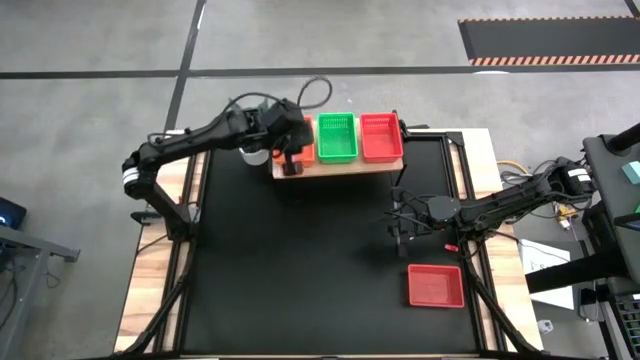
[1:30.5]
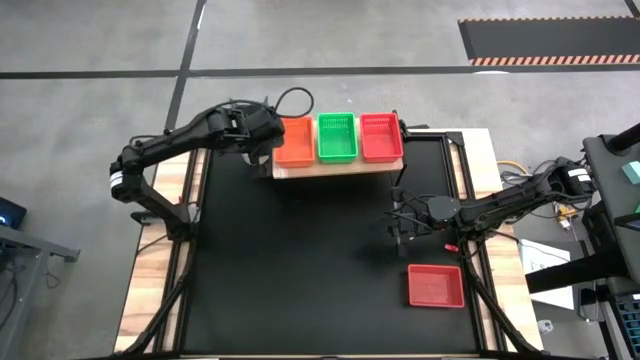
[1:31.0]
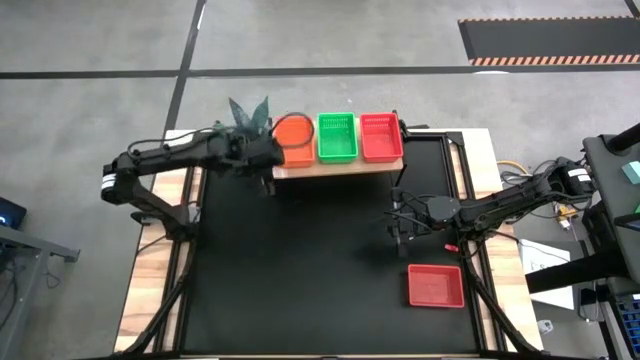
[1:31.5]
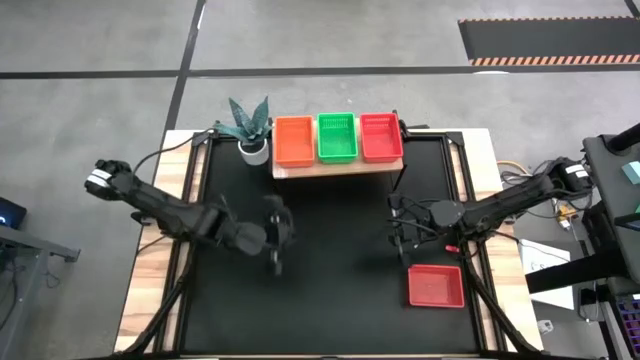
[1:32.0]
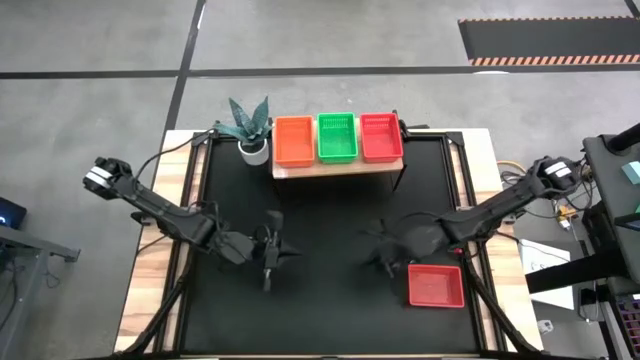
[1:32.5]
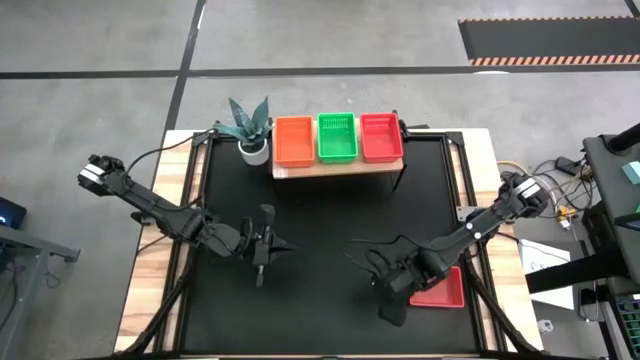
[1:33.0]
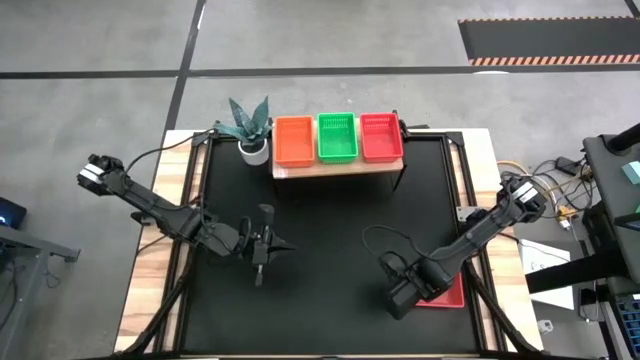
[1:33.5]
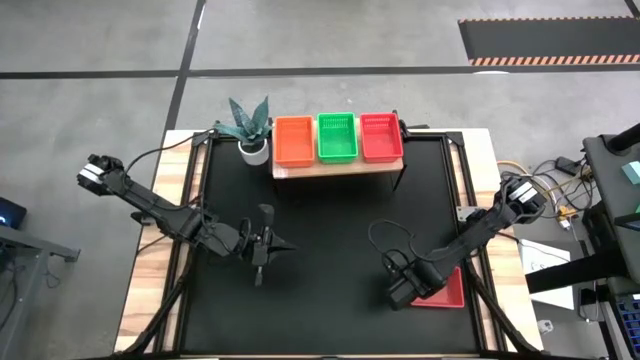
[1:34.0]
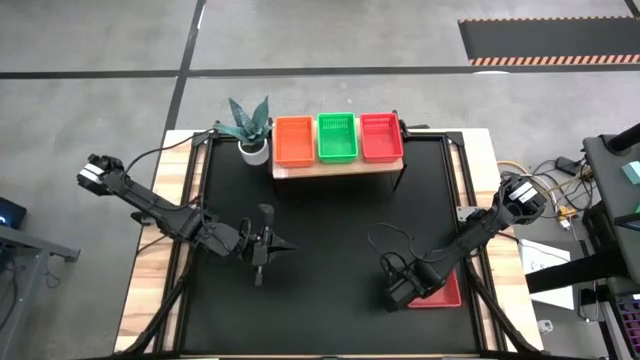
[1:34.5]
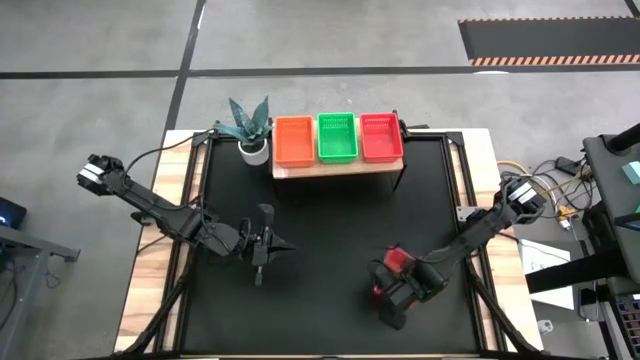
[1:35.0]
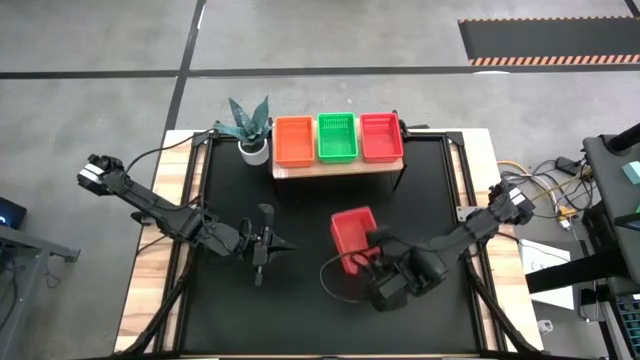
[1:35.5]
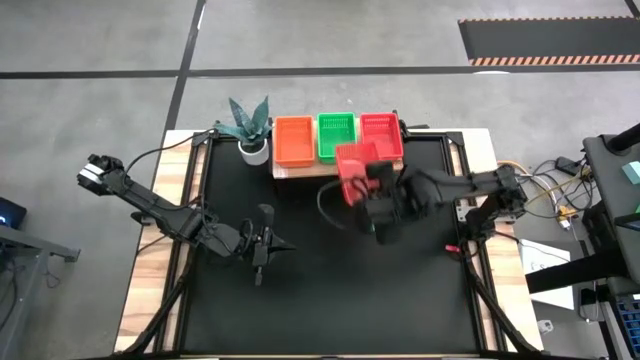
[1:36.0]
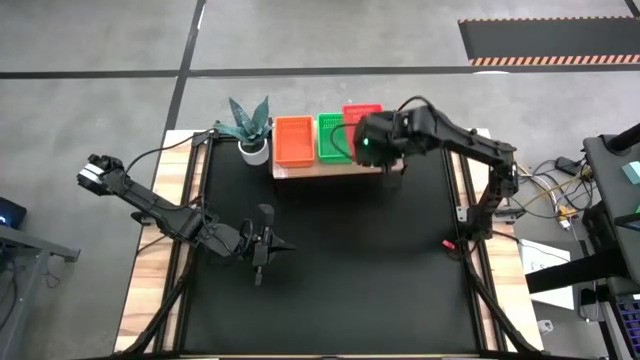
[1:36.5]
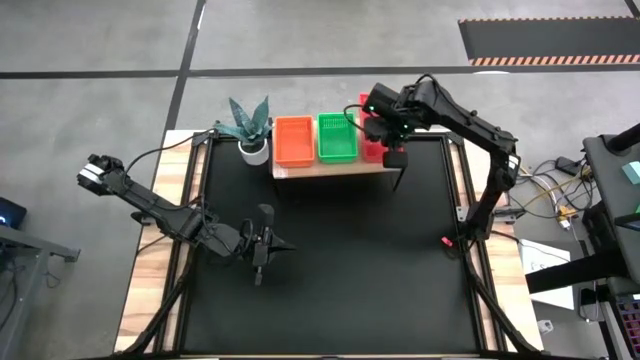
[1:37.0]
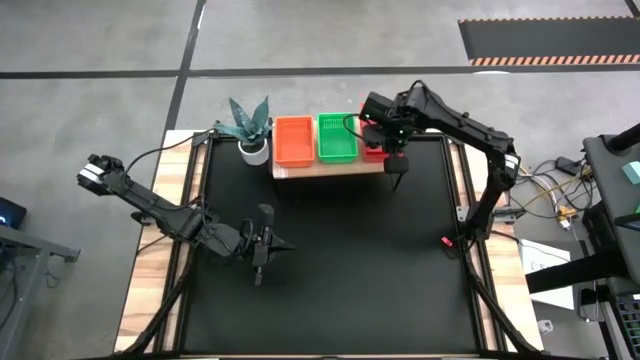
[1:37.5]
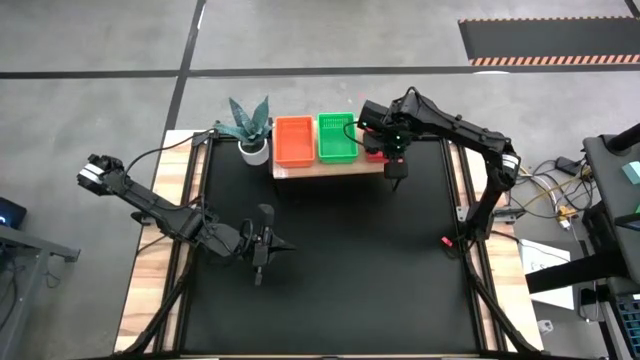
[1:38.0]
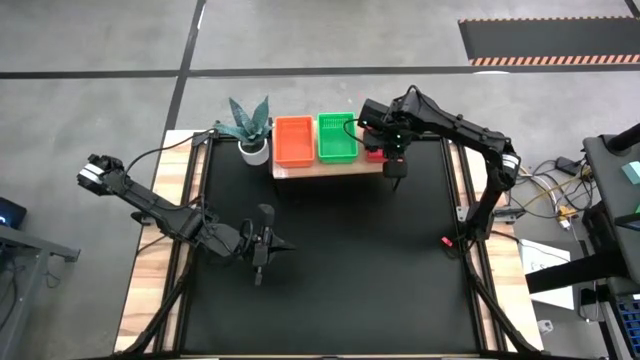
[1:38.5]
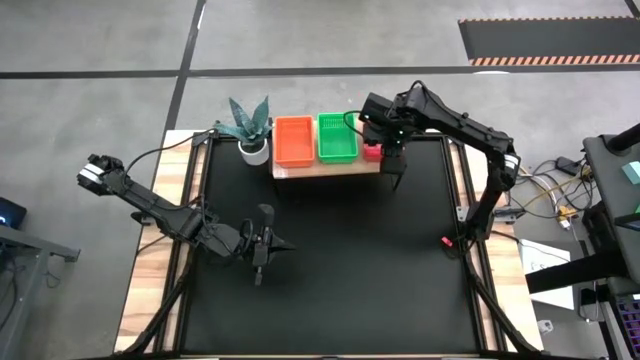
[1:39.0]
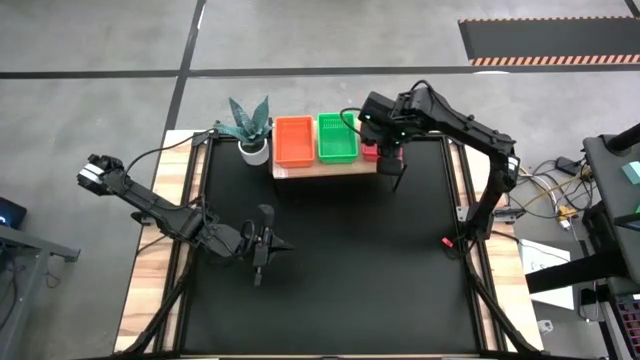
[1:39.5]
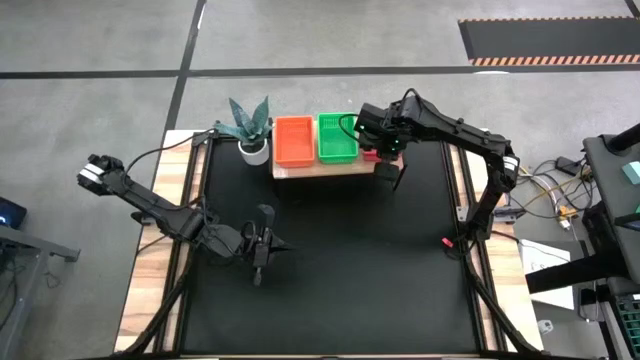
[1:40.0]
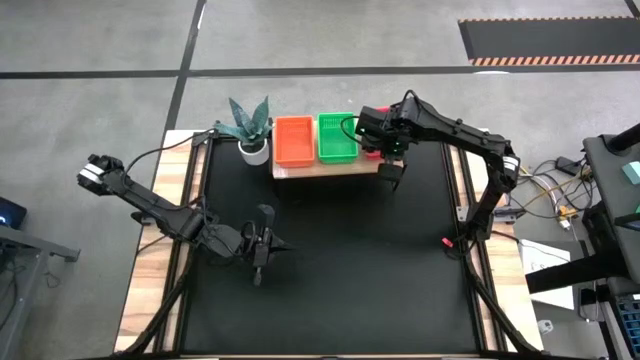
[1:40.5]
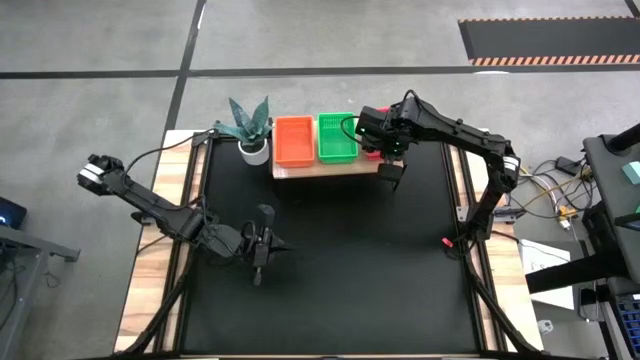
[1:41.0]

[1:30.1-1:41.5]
Task: Stack baskets on shelf by color
Stack the red bin on top of the red bins on the shelf

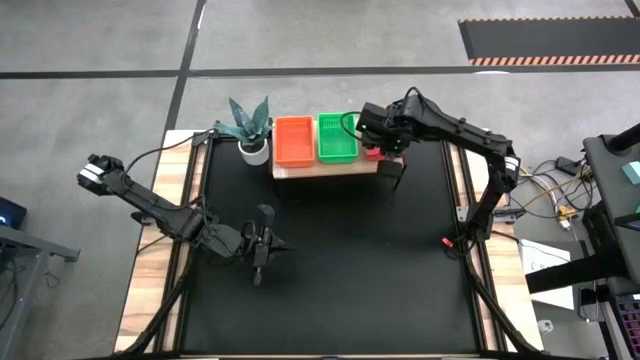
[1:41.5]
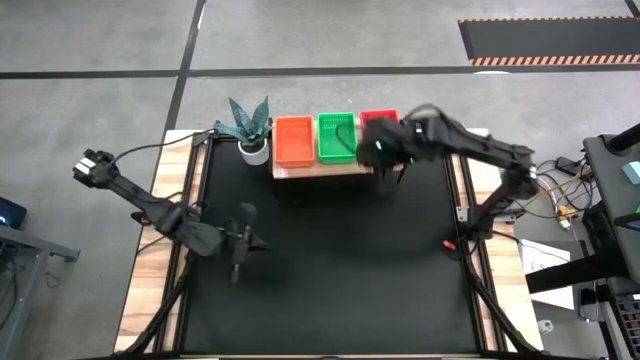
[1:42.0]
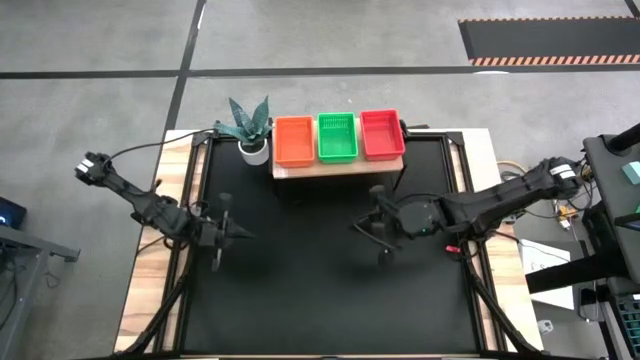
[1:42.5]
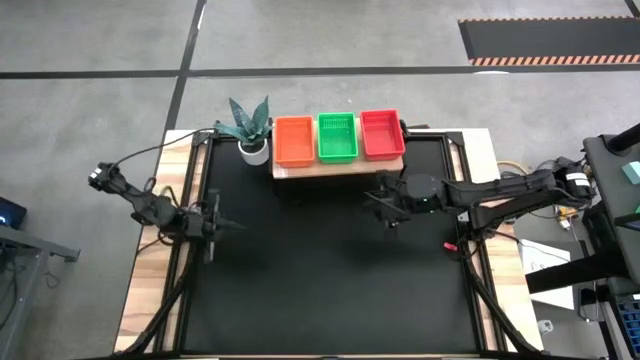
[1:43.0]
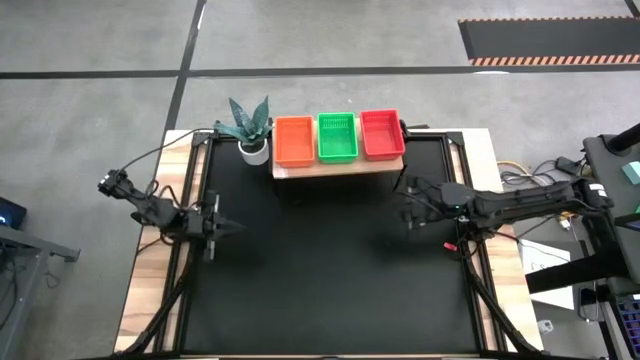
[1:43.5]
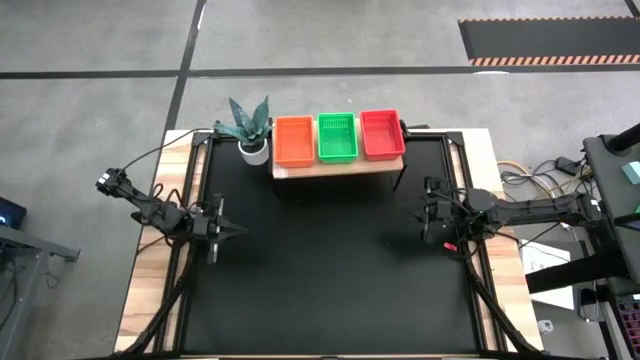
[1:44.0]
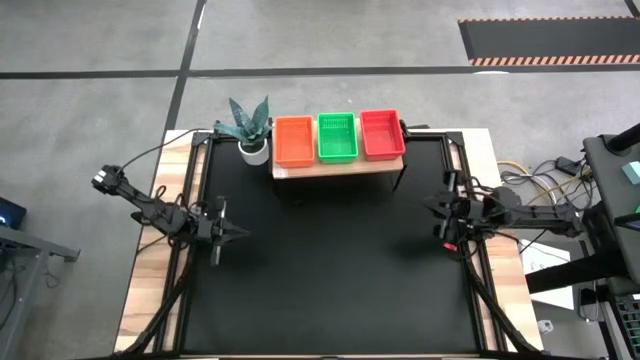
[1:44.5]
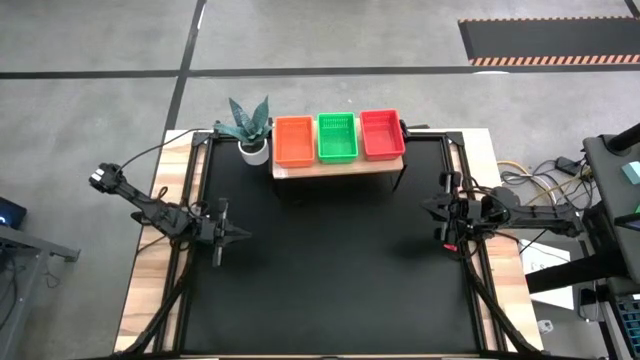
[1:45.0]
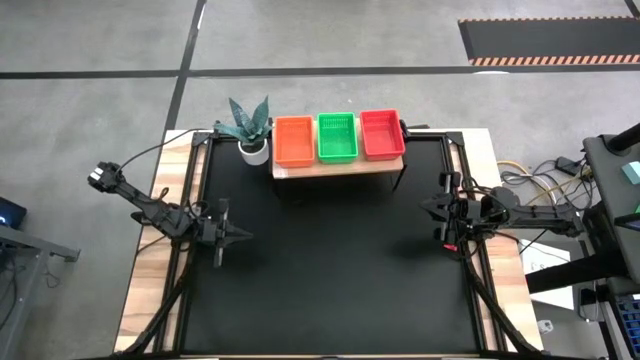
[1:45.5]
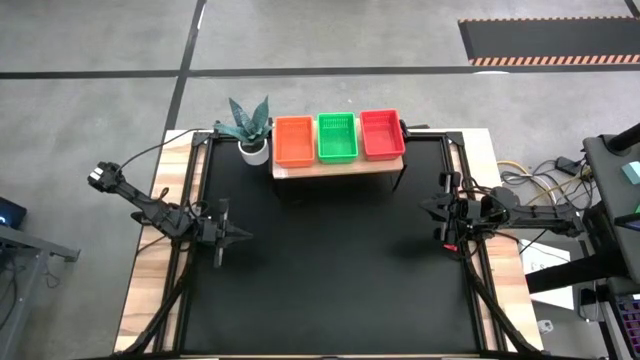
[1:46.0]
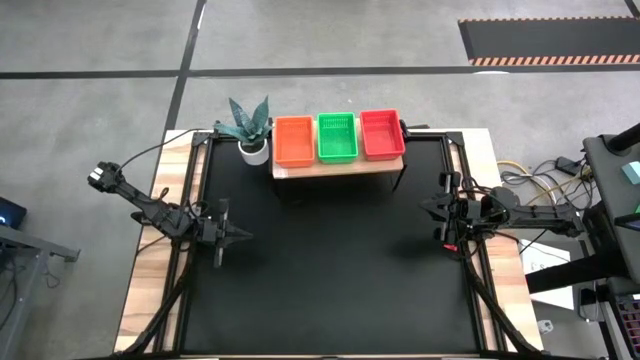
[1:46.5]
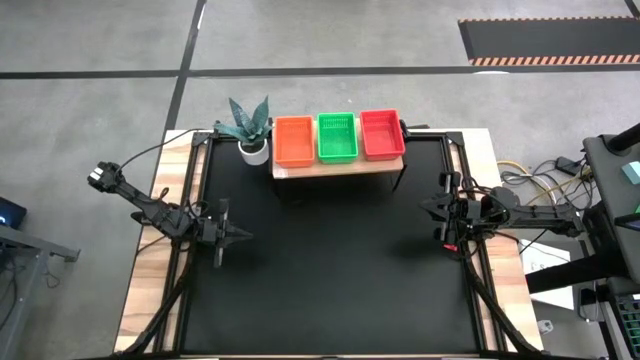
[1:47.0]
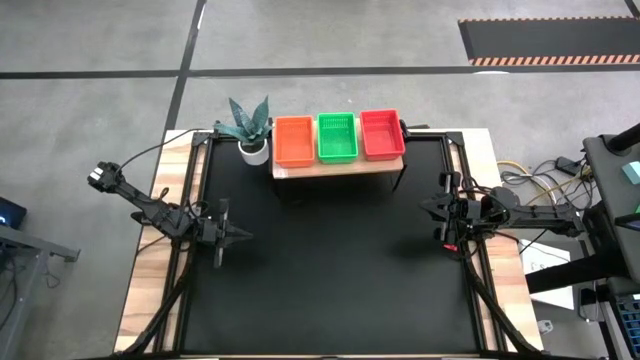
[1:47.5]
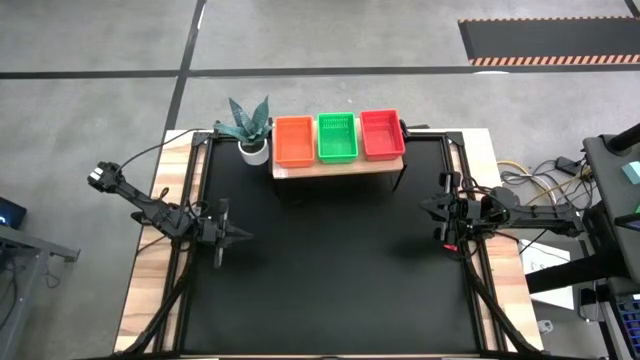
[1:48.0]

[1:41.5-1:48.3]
Return to Home Position

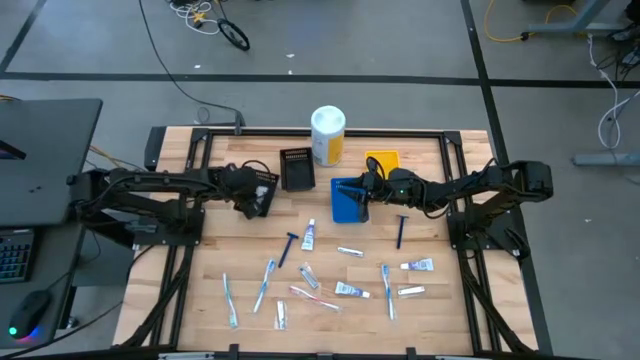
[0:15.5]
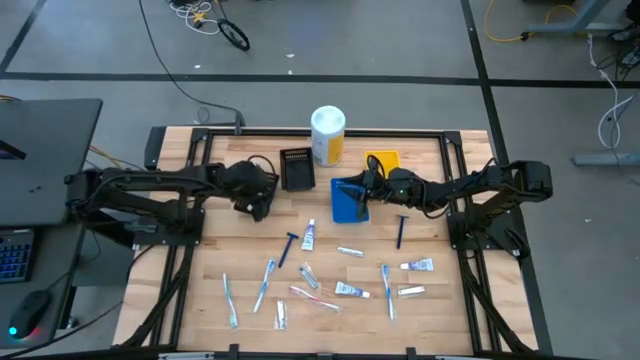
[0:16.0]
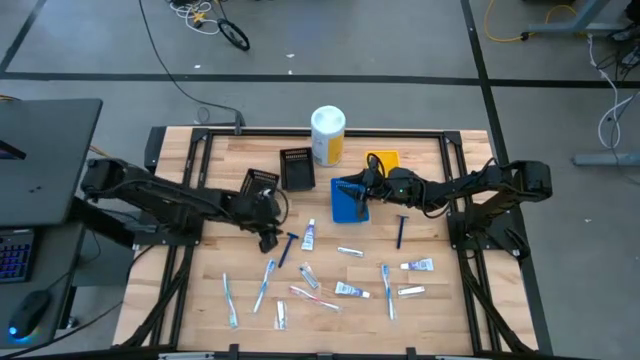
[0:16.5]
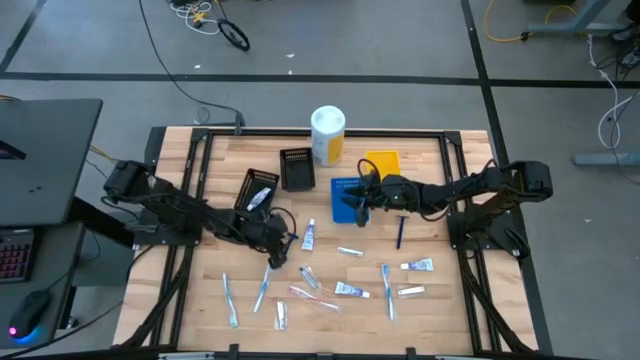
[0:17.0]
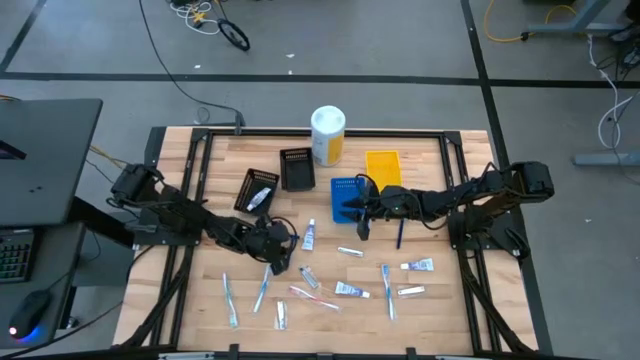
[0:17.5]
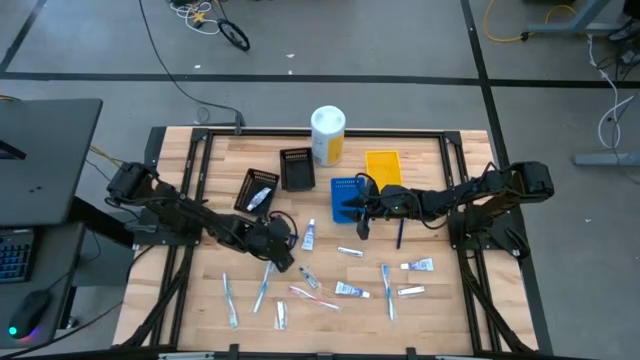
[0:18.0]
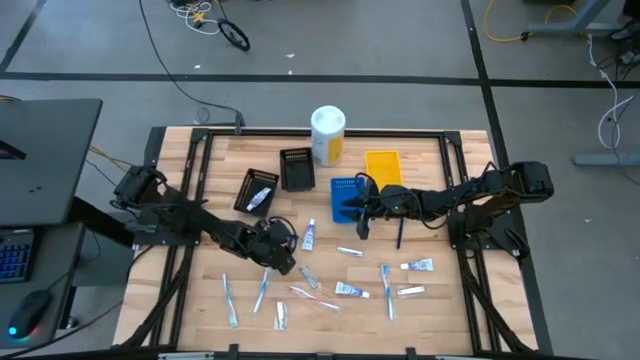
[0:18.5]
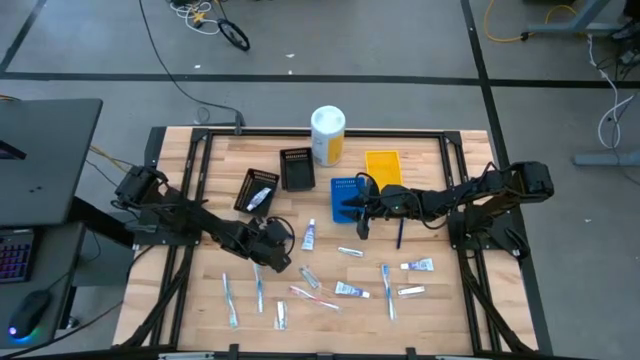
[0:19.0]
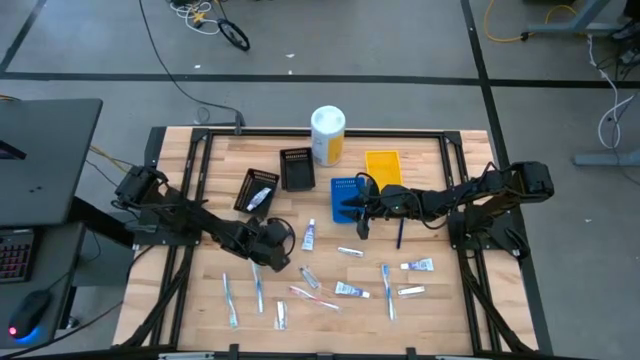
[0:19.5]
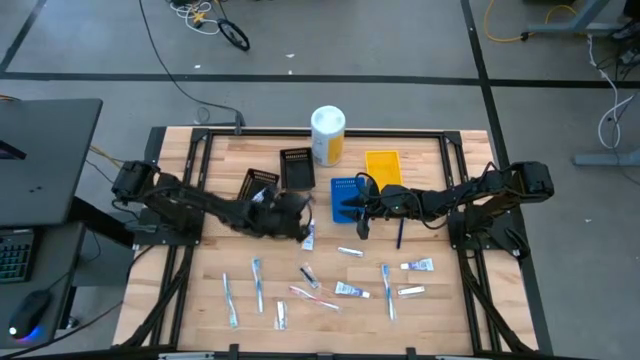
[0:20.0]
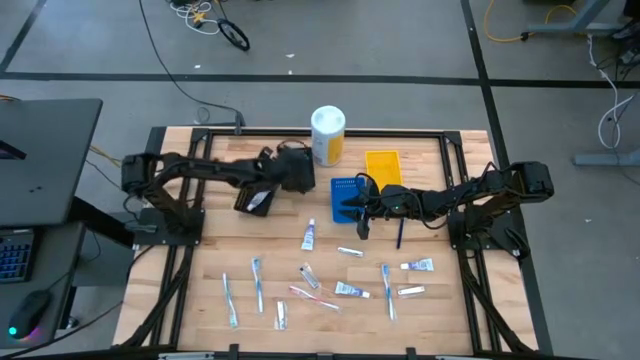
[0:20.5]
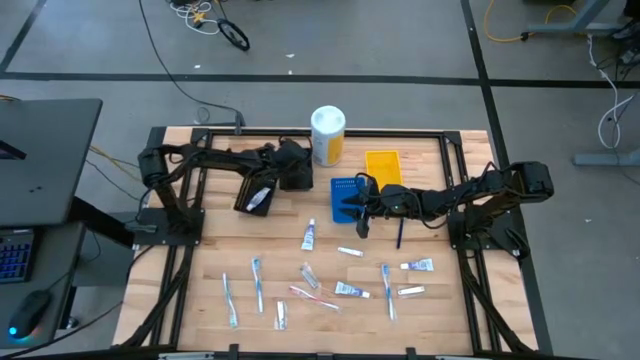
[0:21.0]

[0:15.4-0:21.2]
Task: Pick & Place Travel size toiletries
Put the blue razor into the right black bin
